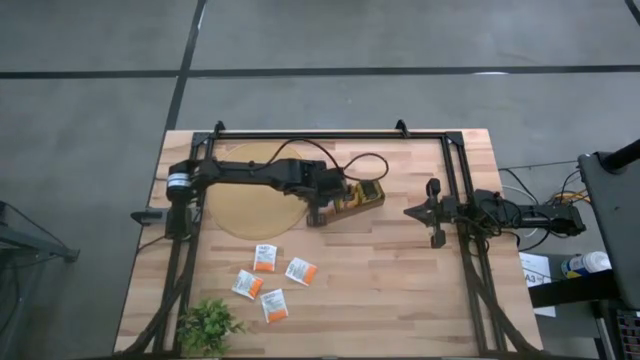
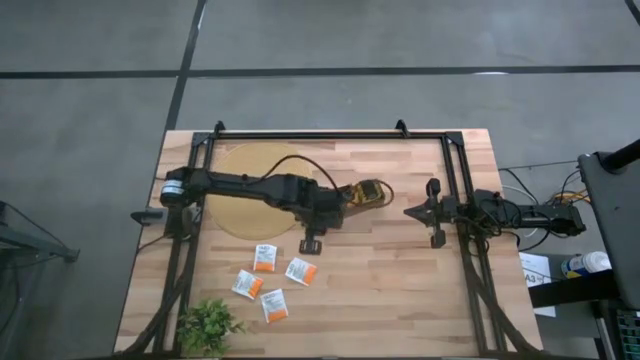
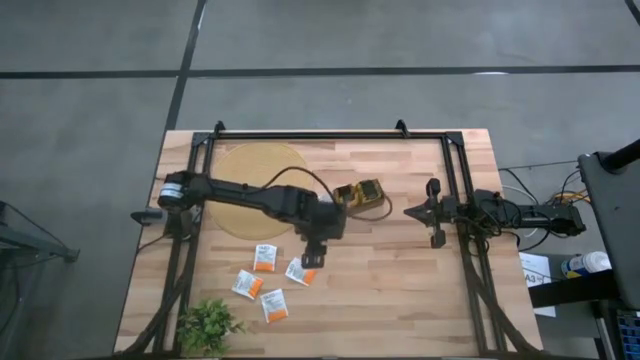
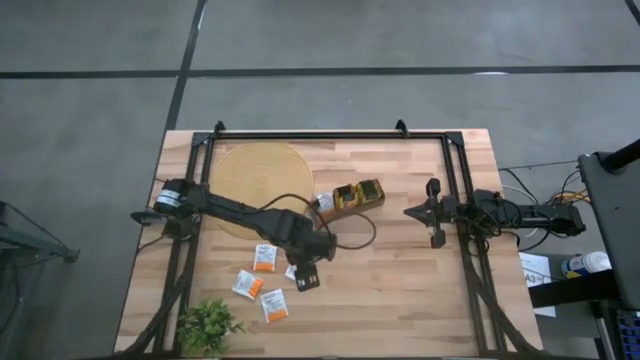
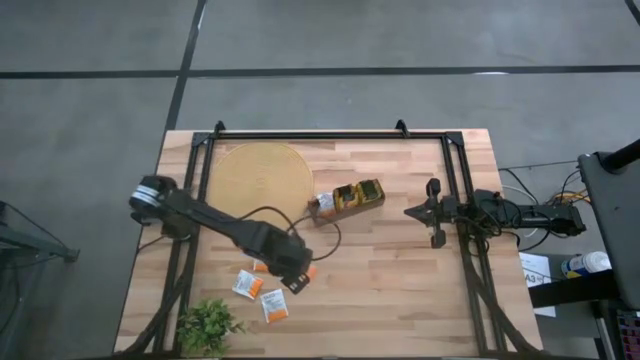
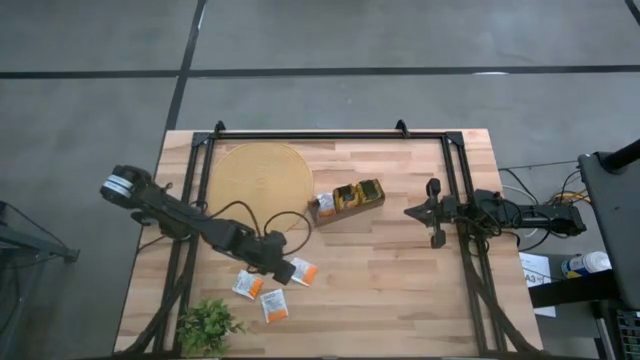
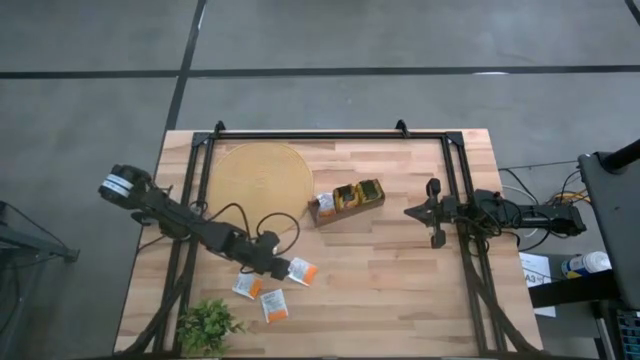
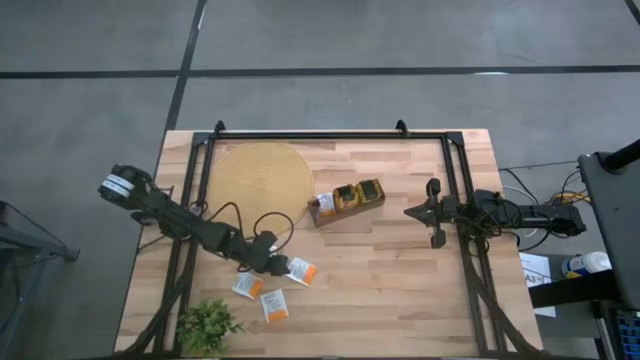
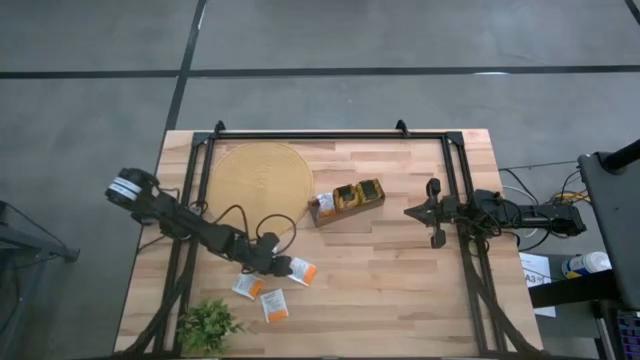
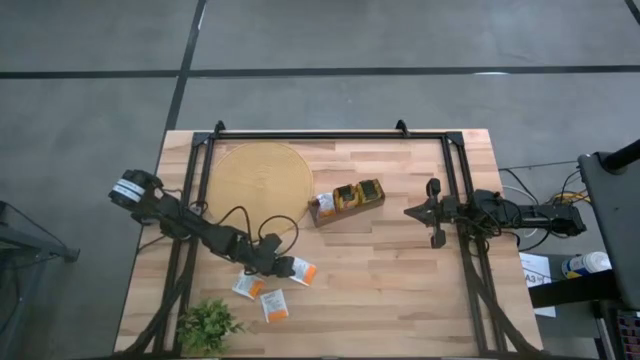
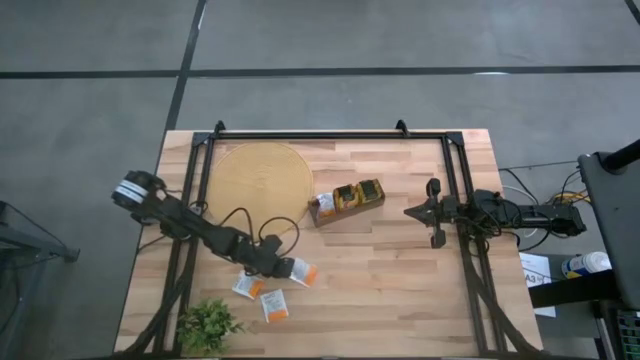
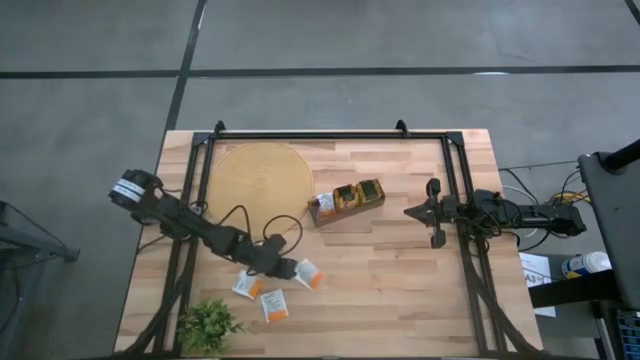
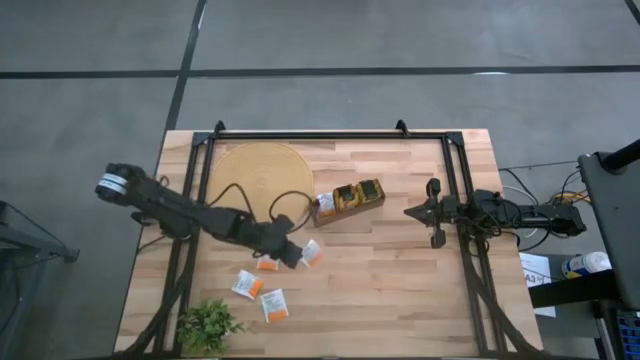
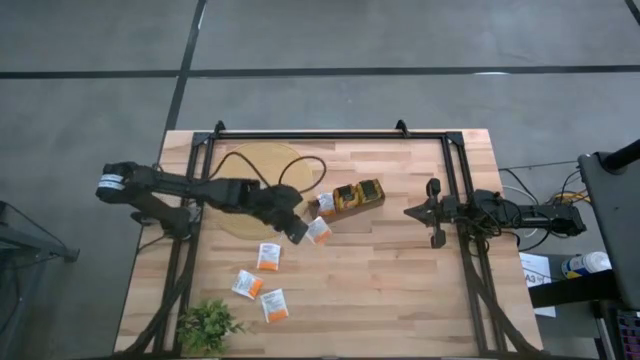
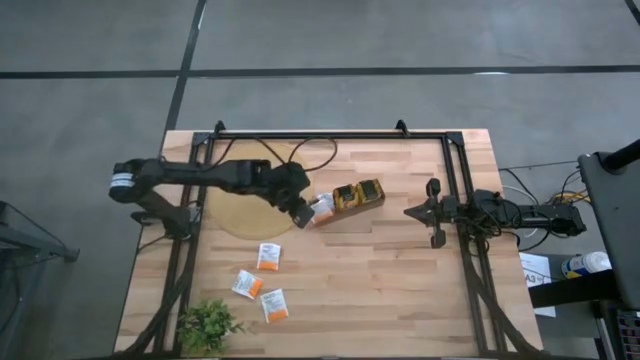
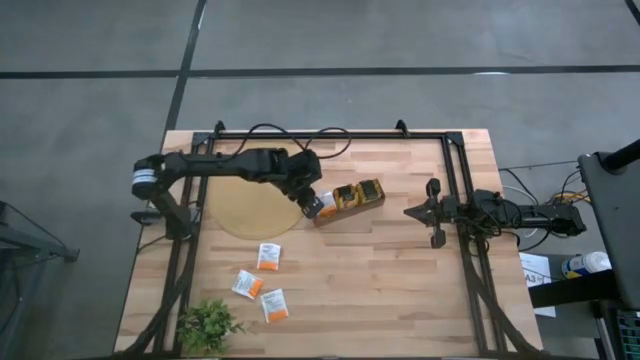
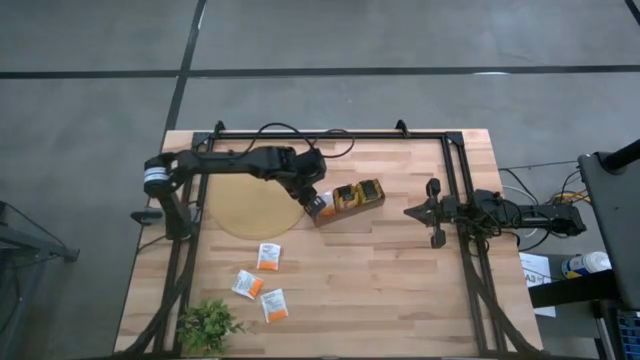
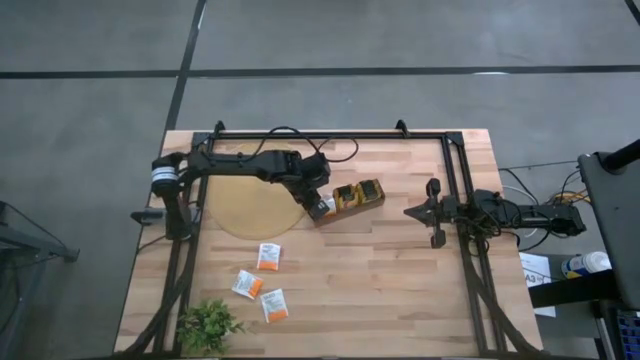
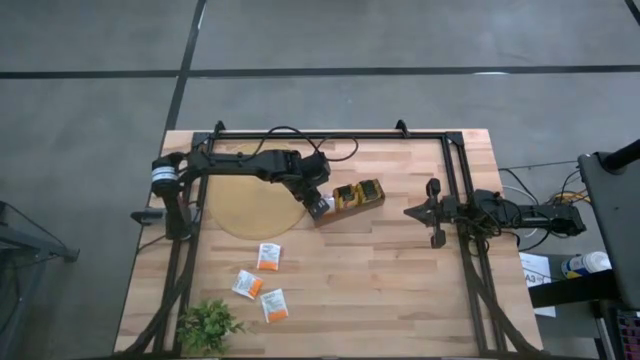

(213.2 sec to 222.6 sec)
Task: Pick & Place Tea
Put the white tea bag into the left section of the wooden organizer

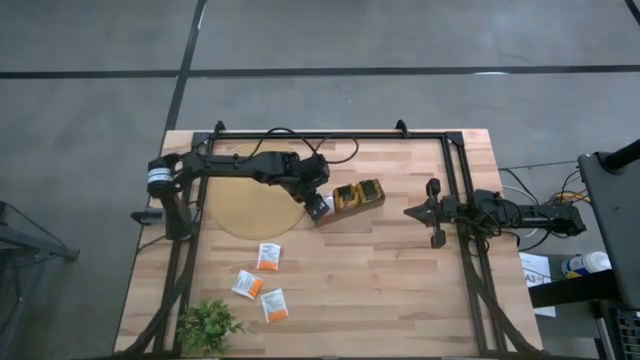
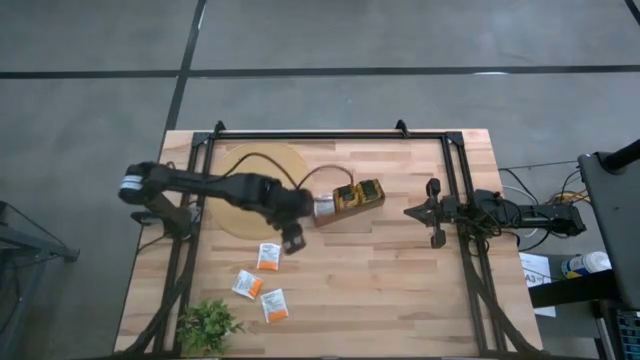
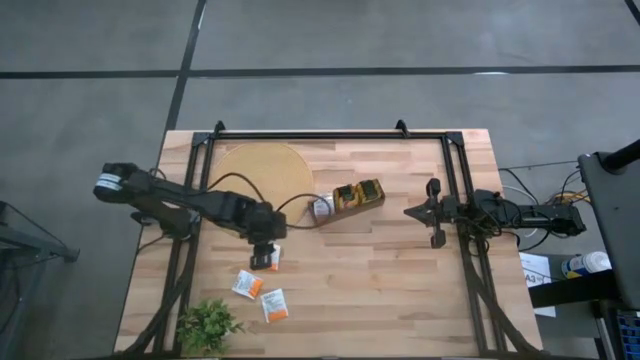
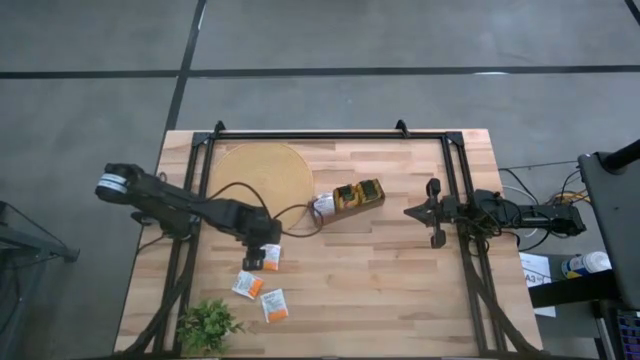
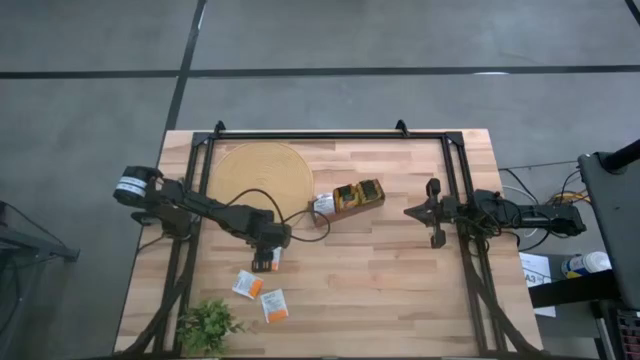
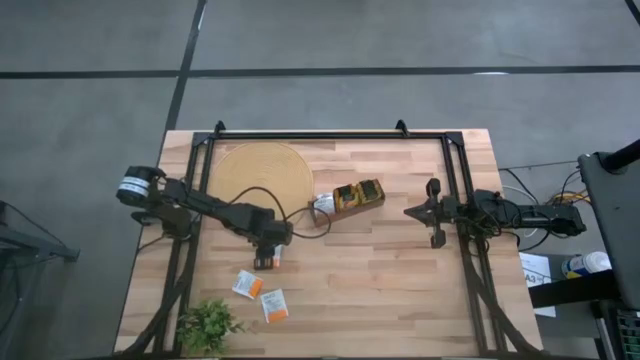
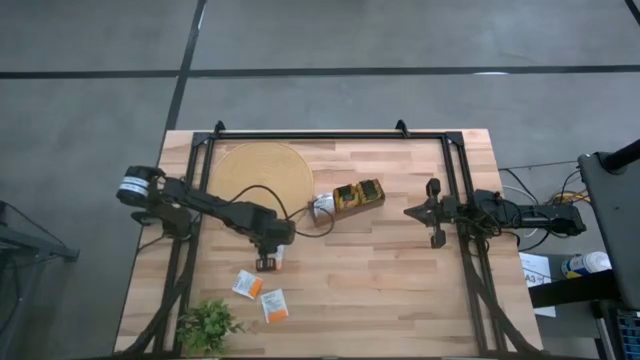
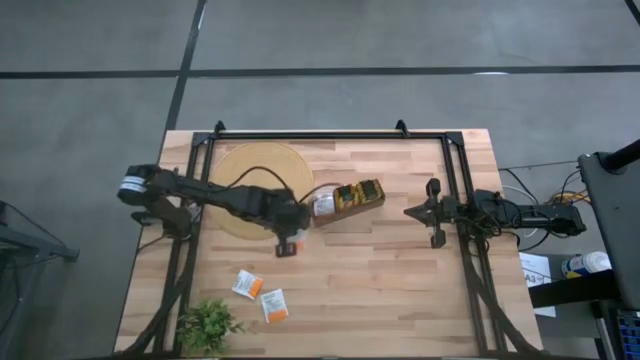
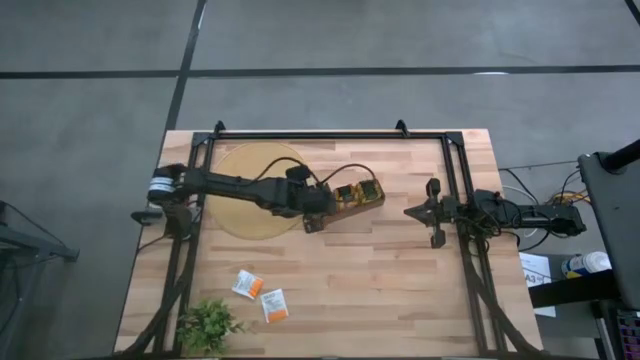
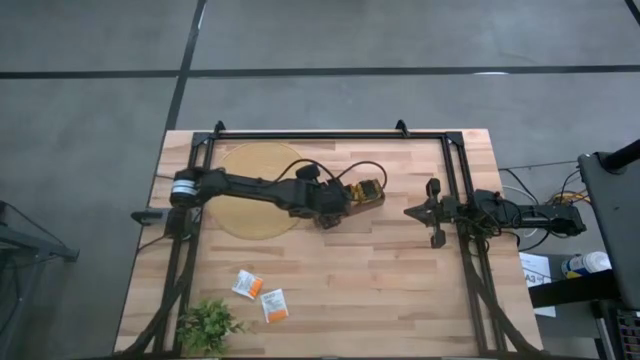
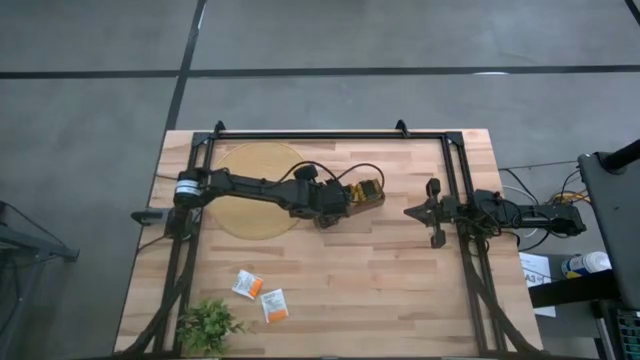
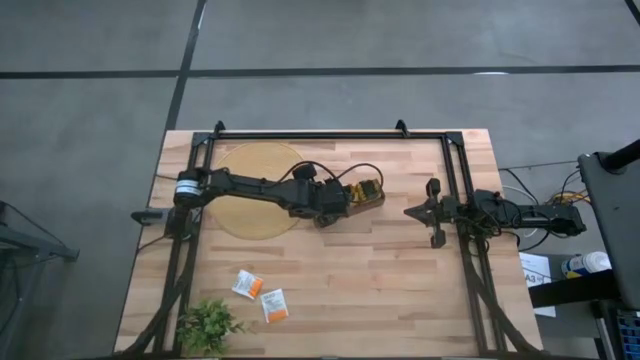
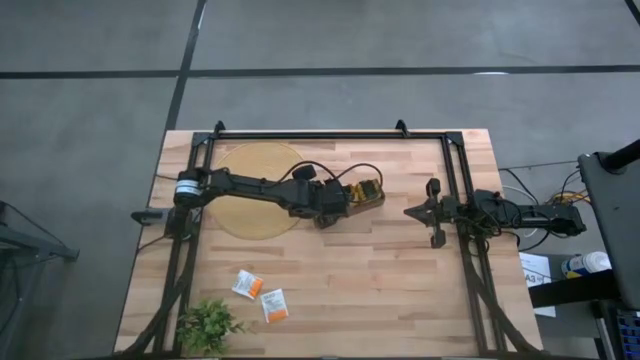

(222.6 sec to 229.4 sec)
Put the white tea bag into the left section of the wooden organizer
